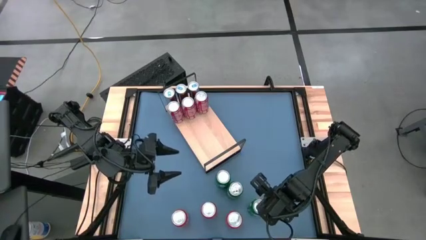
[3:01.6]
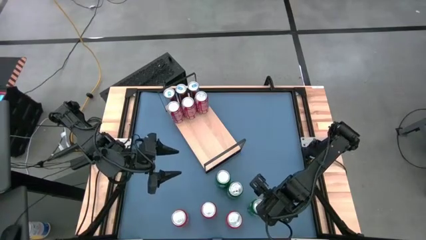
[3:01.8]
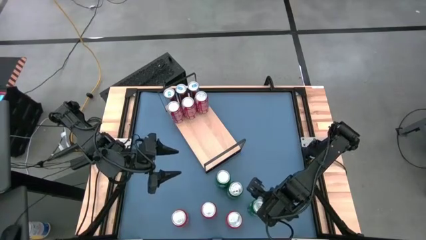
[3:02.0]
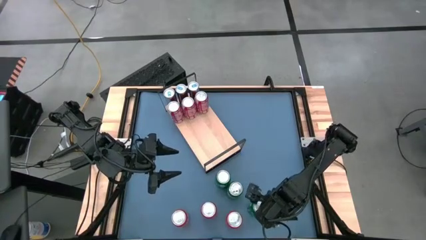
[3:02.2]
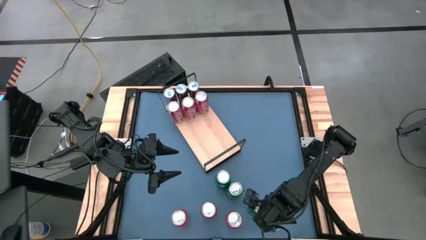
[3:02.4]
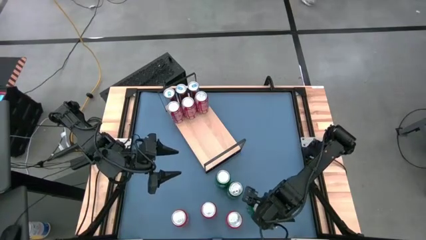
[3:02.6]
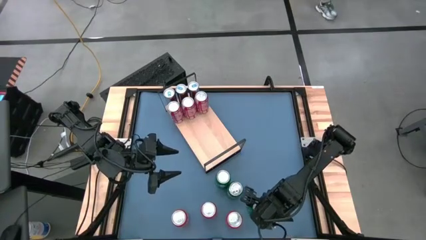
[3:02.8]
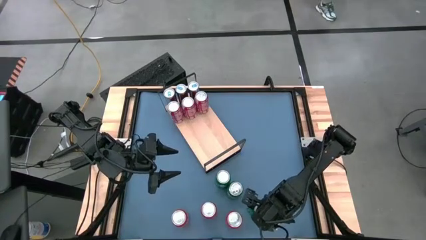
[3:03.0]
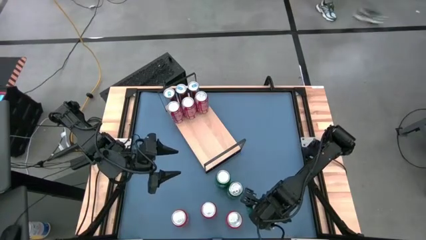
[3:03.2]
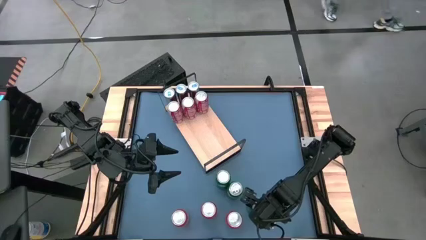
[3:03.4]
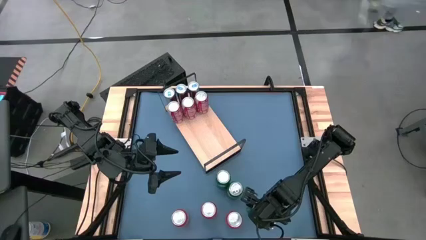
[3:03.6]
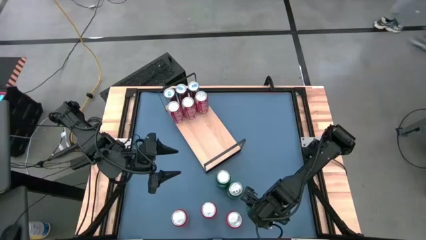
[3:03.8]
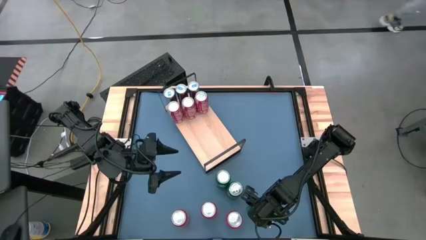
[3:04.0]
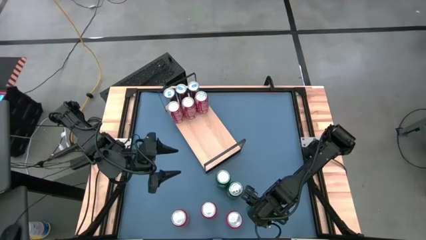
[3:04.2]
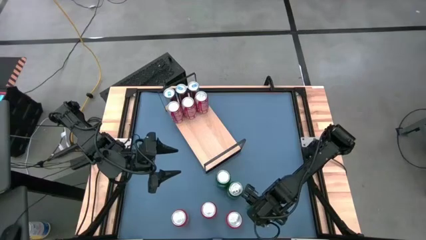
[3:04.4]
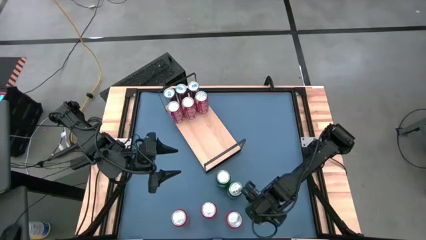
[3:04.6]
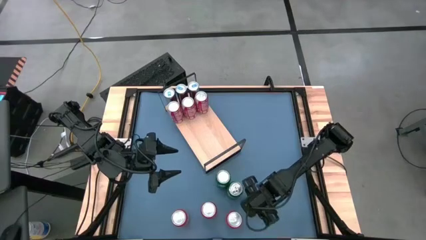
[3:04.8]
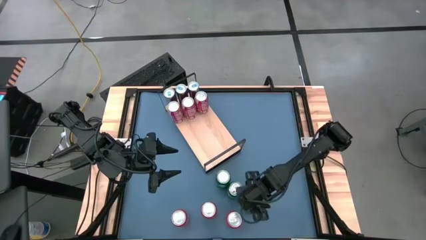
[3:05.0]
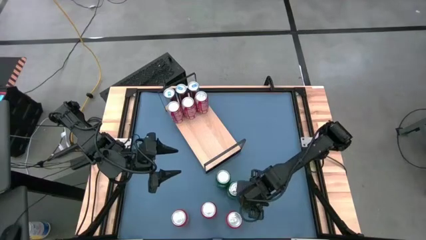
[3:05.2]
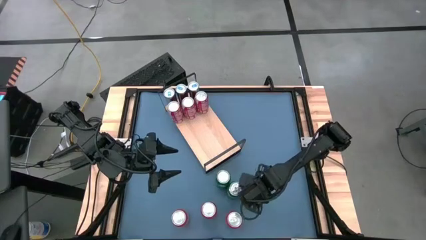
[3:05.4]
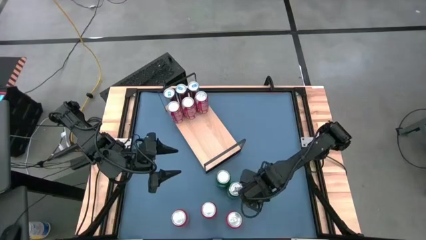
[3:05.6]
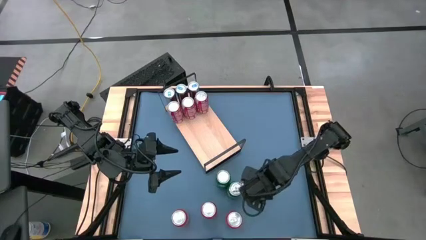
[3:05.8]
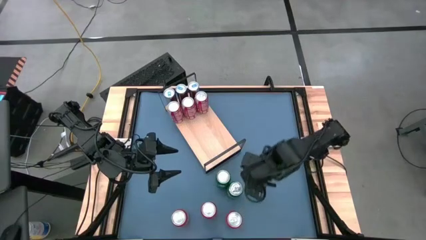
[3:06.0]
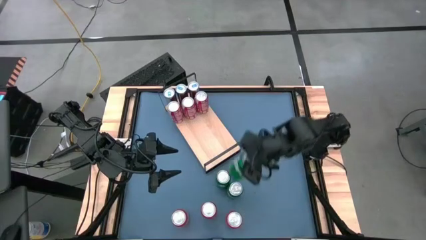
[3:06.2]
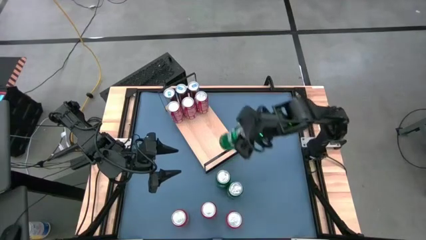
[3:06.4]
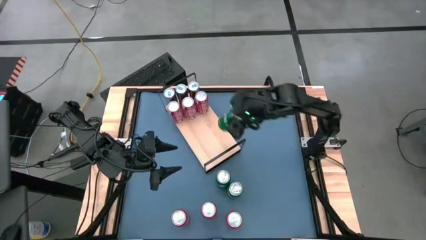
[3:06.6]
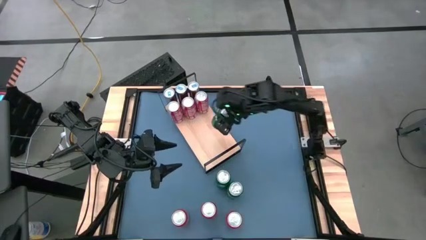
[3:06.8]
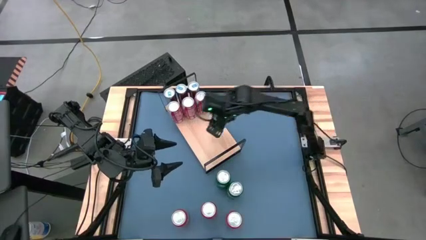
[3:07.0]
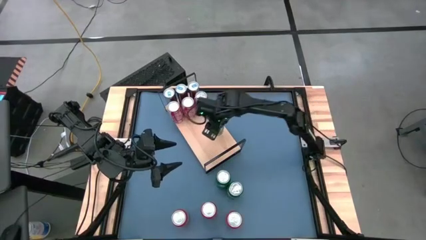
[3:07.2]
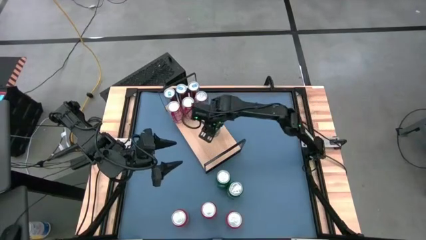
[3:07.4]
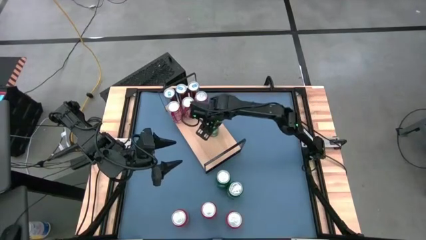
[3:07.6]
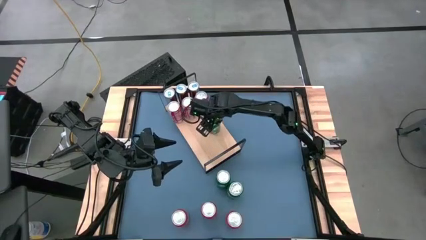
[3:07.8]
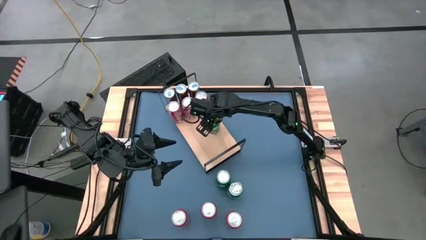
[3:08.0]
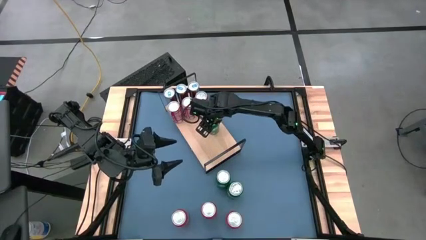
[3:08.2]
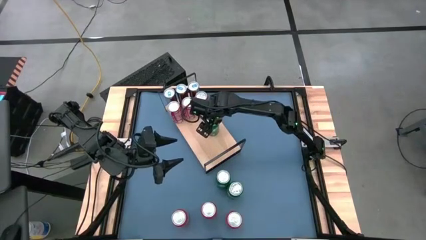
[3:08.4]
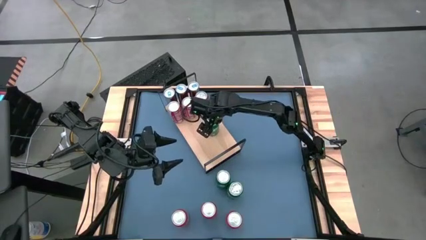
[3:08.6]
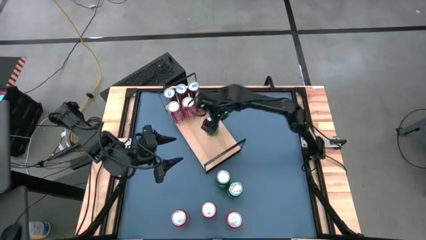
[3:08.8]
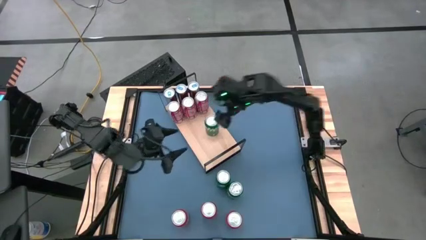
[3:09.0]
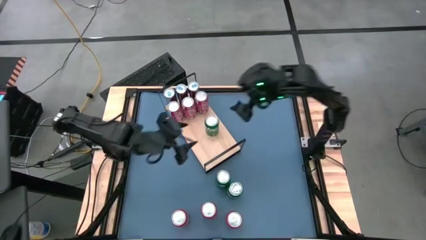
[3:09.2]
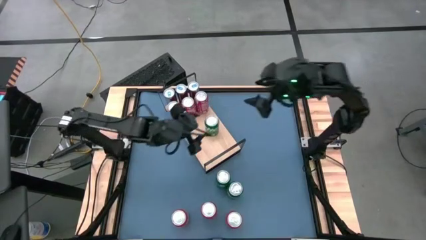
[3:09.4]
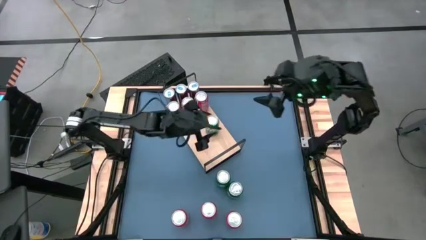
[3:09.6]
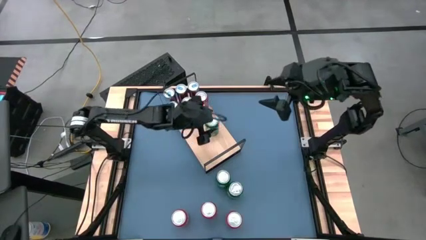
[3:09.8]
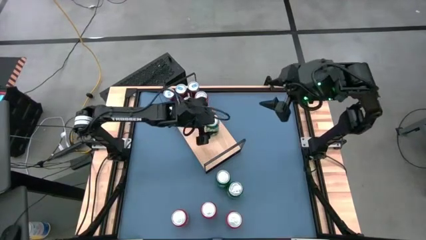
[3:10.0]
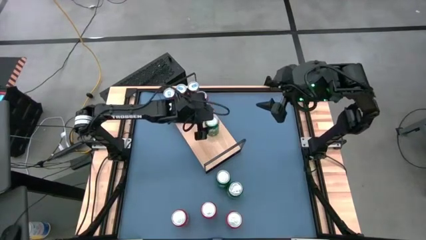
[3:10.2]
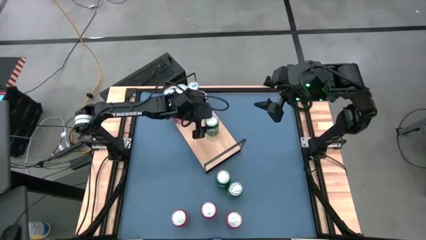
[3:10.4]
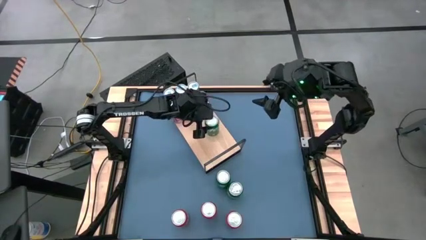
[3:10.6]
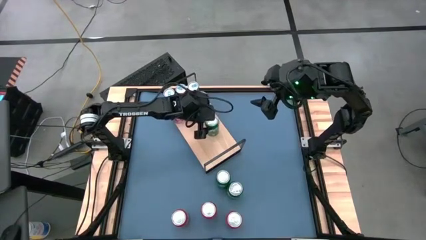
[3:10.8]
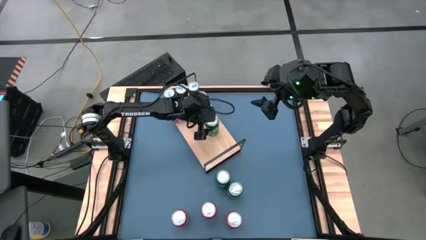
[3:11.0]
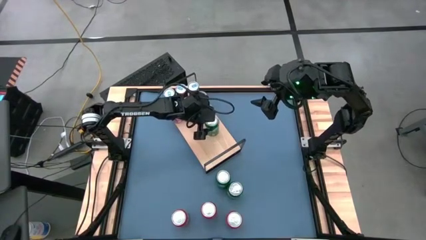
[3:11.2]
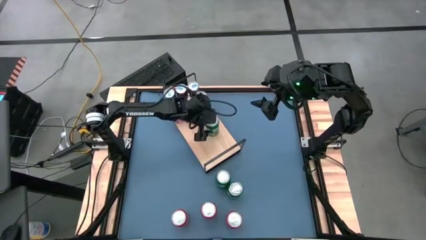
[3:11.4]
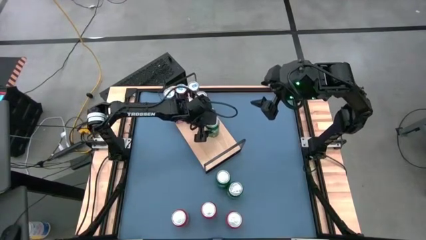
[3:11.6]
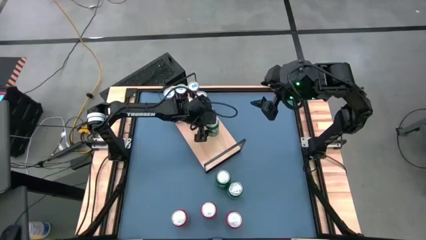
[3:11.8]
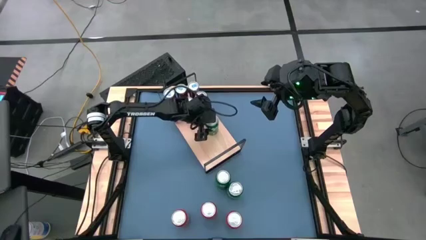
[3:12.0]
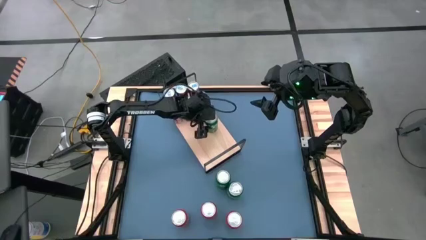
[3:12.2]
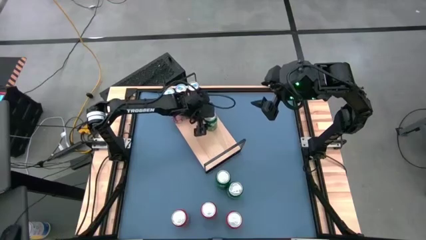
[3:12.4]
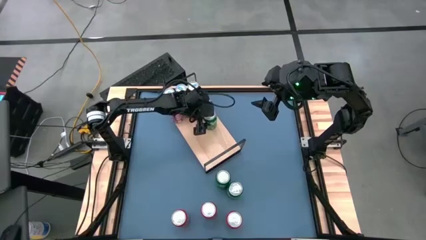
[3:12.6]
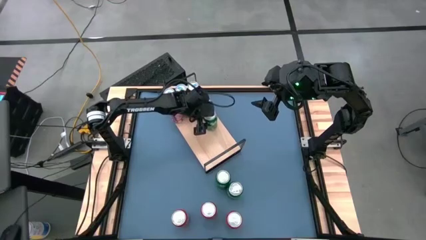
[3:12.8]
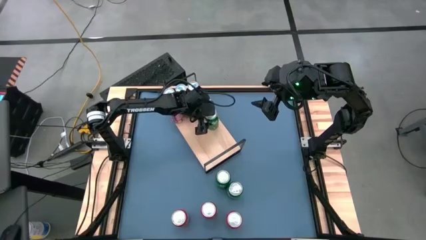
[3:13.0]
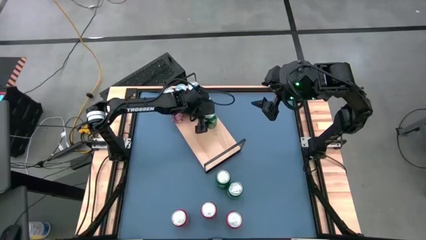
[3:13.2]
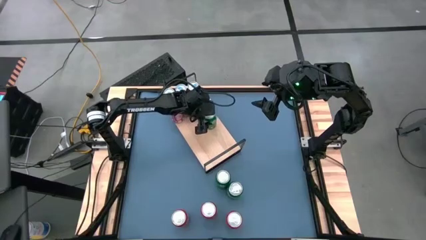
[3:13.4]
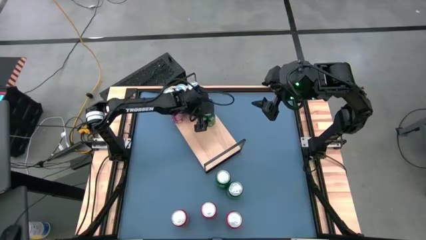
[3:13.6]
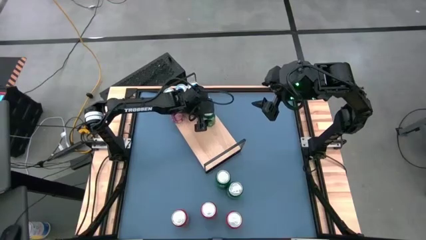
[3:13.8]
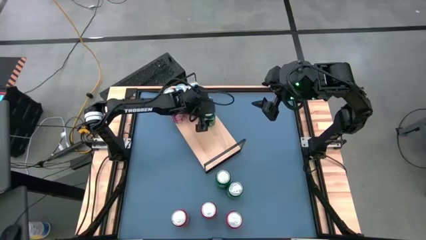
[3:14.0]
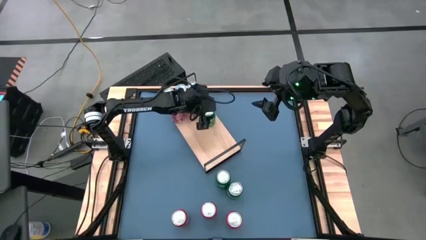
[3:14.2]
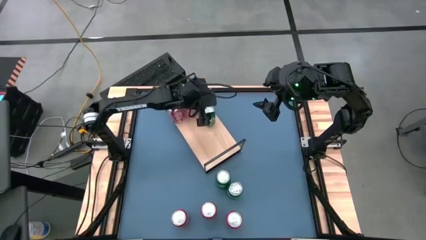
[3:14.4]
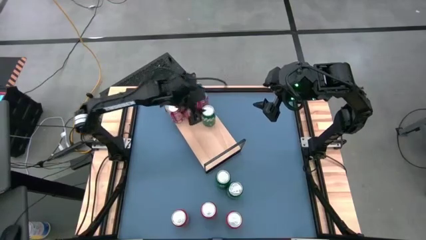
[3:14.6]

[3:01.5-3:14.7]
Task: Place canned beverage on shelf
Put the bottom green soda can on the shelf
